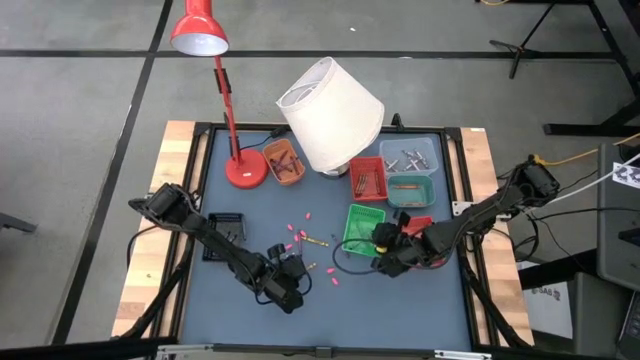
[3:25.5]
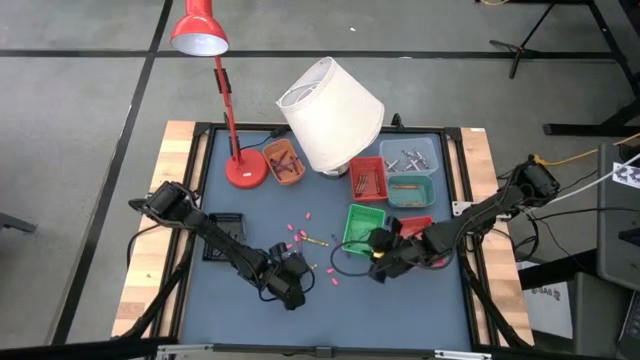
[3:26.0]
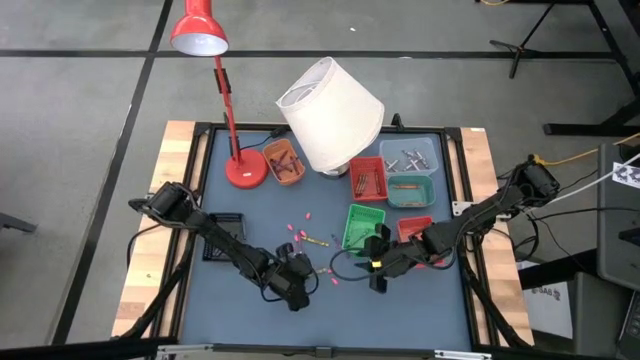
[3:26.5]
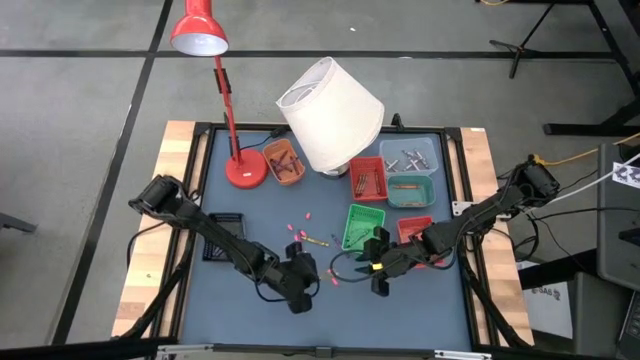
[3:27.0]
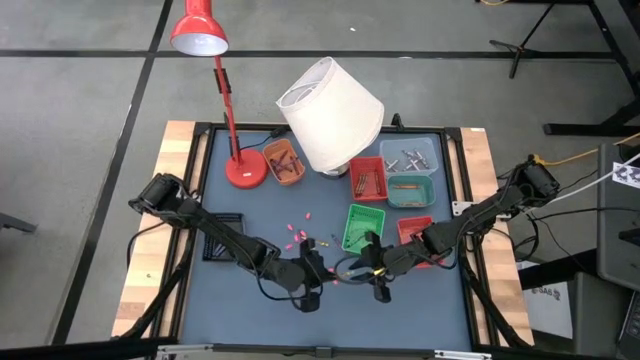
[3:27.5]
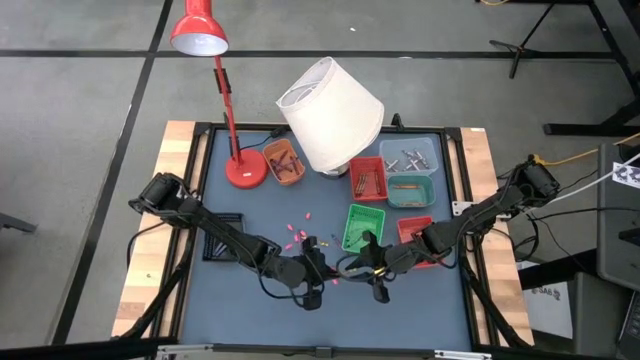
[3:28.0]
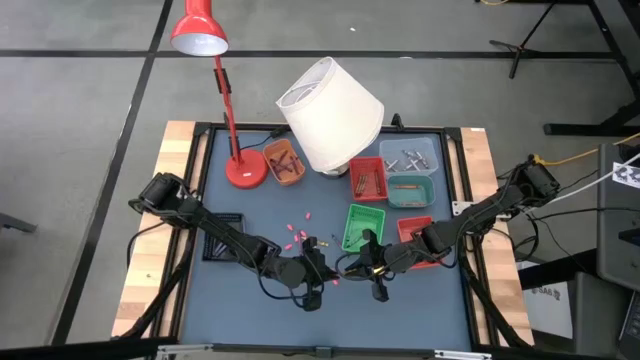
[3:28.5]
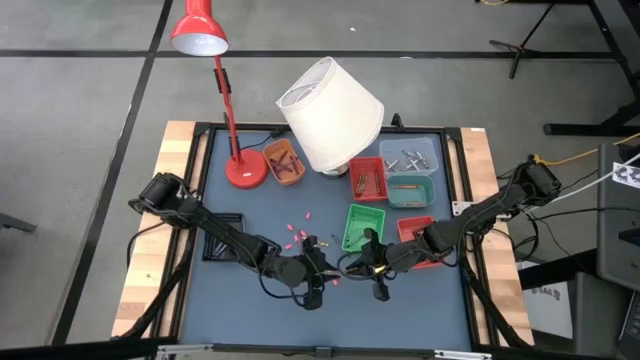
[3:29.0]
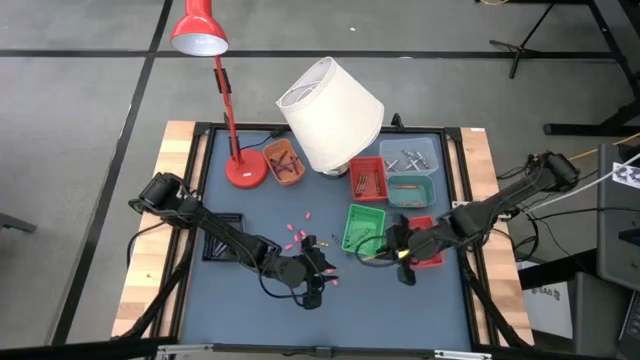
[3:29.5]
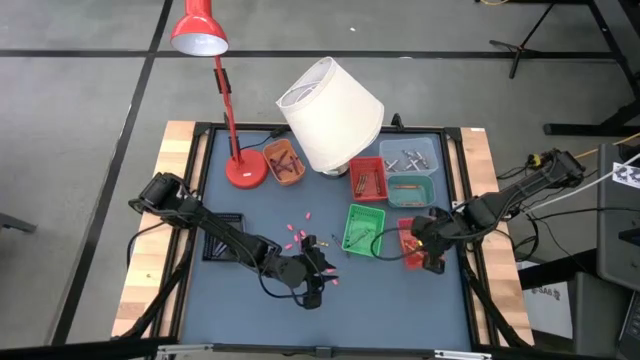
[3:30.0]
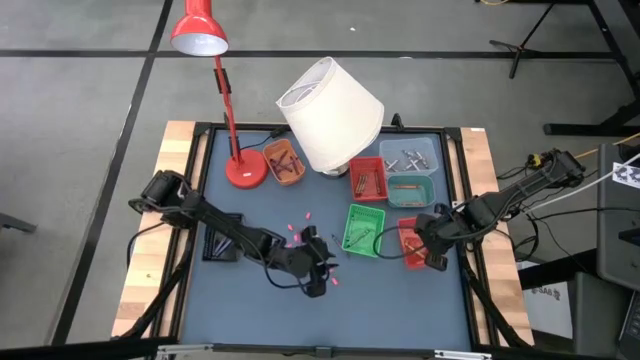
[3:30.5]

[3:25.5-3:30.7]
Task: Sort crayons
Put the yellow crayon into the bottom dark orange bin

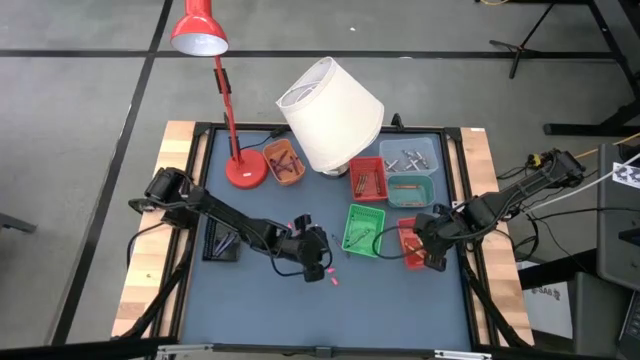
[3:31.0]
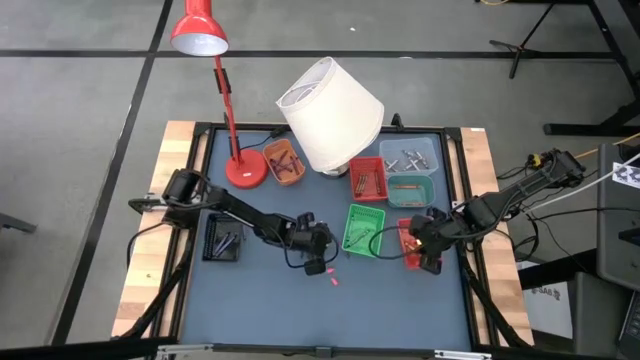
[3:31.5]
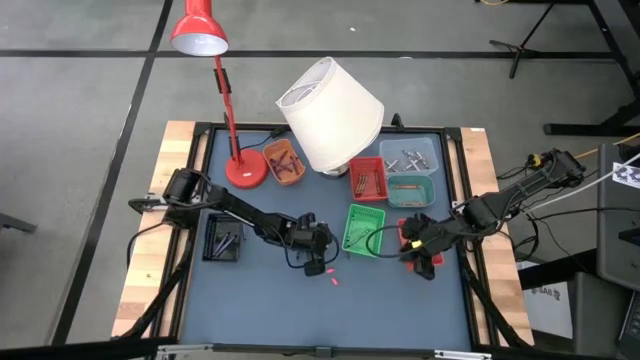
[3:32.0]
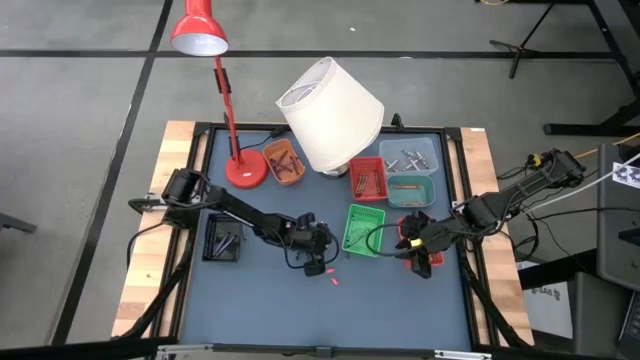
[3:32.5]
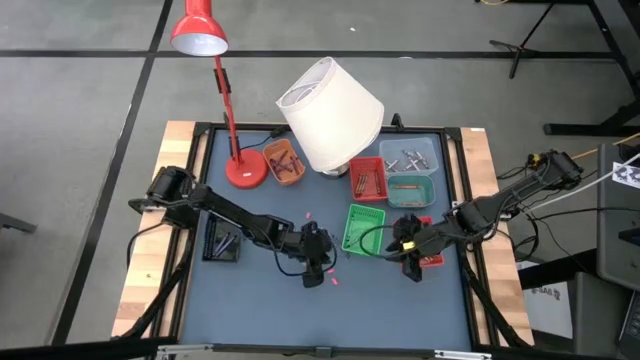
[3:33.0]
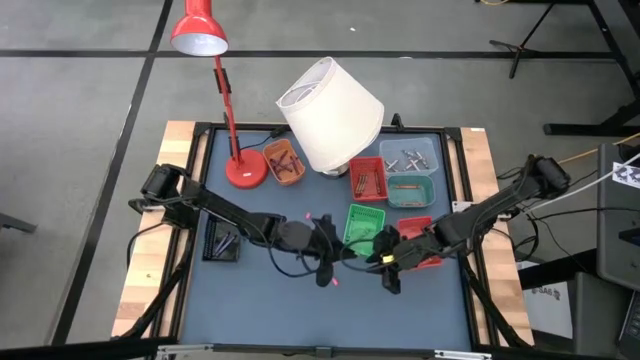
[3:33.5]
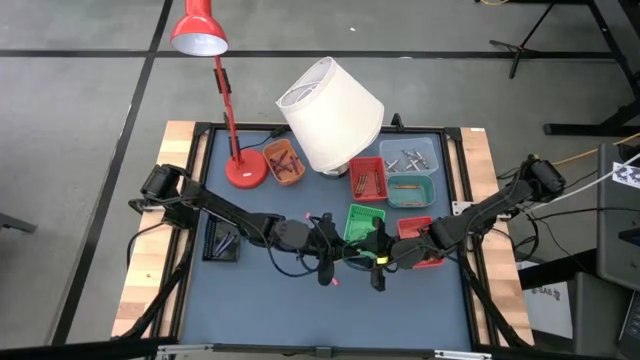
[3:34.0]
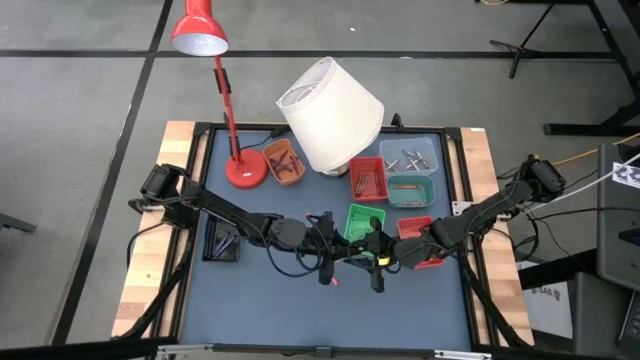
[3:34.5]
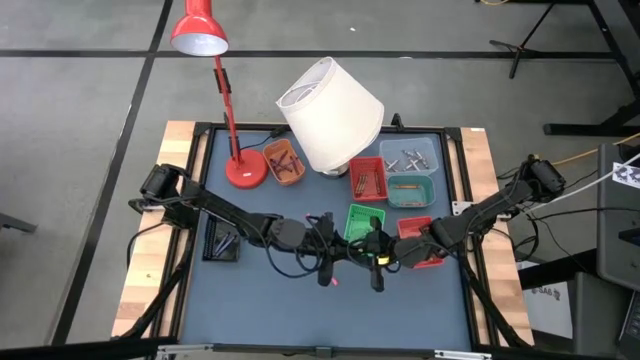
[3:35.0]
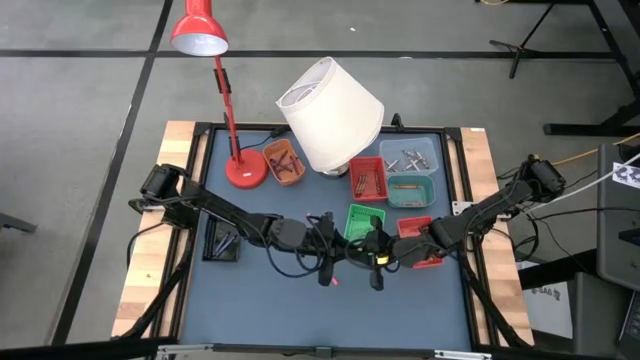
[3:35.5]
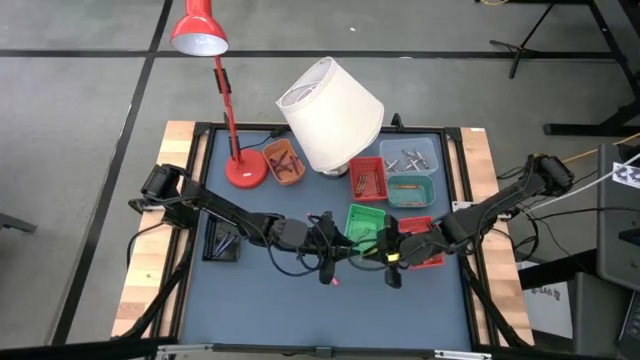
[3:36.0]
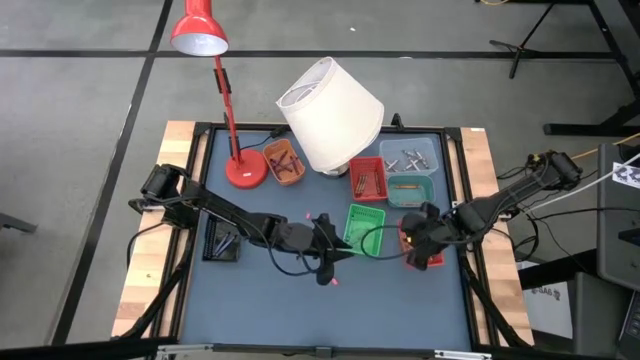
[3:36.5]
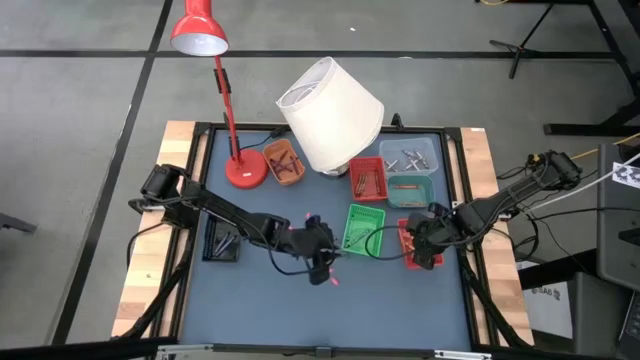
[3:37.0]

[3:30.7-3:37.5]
Put the yellow crayon into the bottom dark orange bin

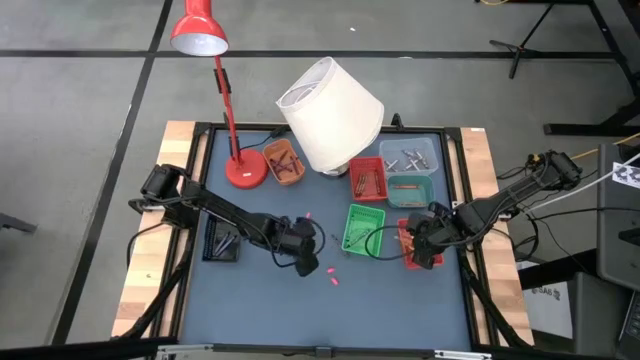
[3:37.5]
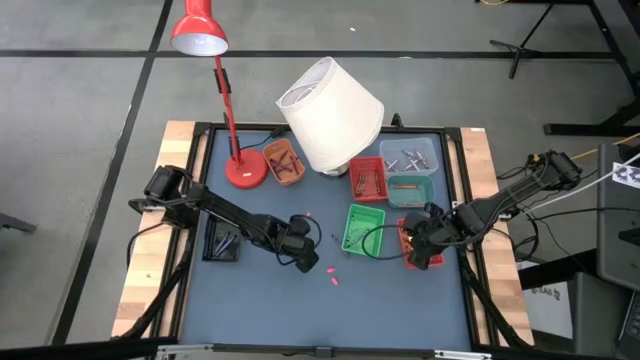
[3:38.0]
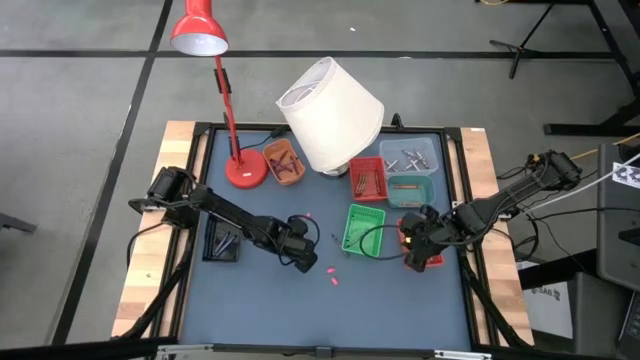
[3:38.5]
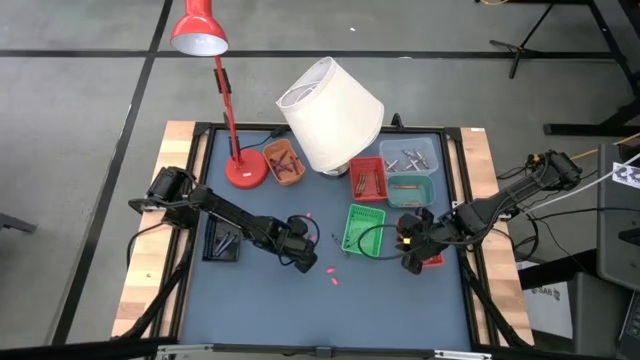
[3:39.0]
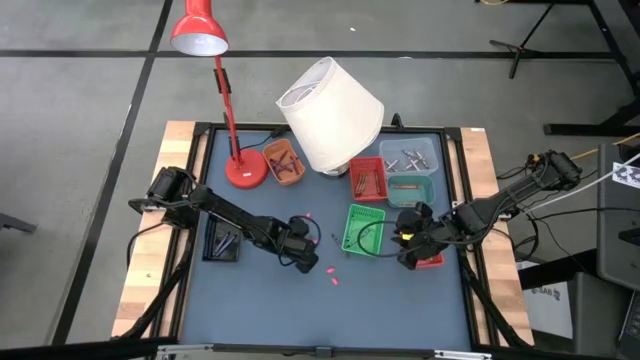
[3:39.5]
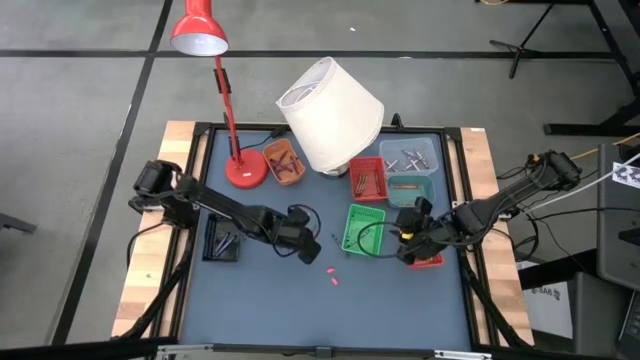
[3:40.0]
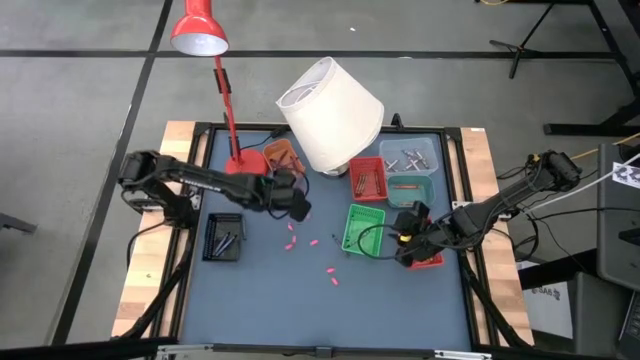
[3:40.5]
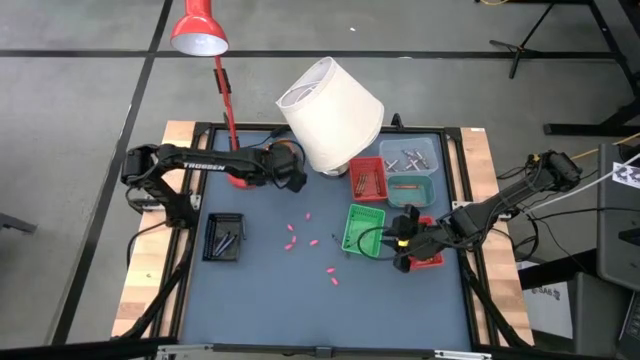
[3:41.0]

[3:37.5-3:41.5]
Put the violet crayon into the orange bin

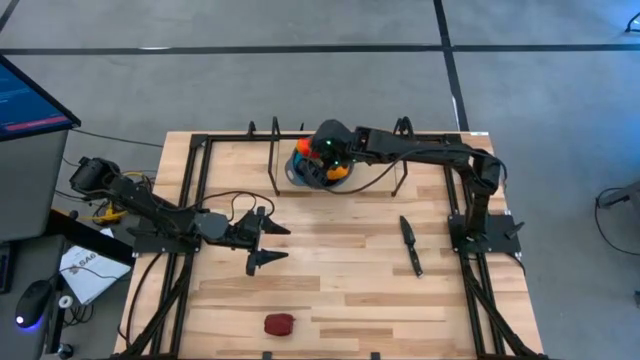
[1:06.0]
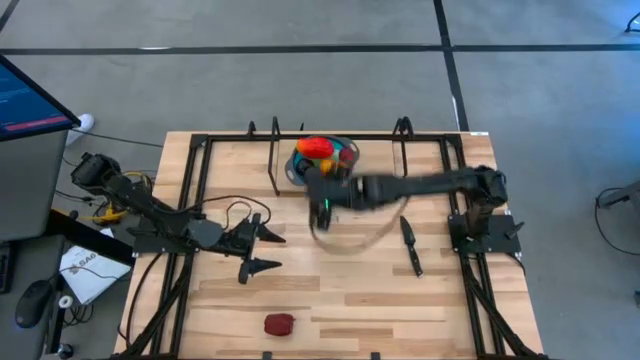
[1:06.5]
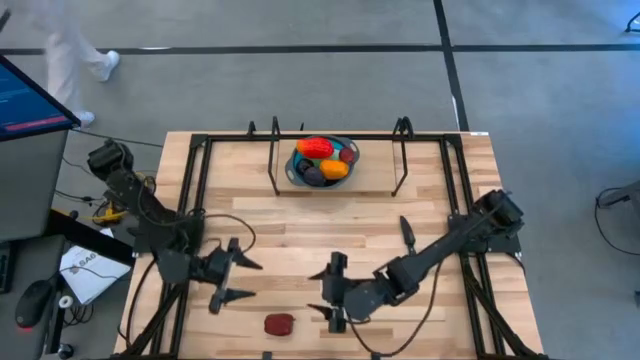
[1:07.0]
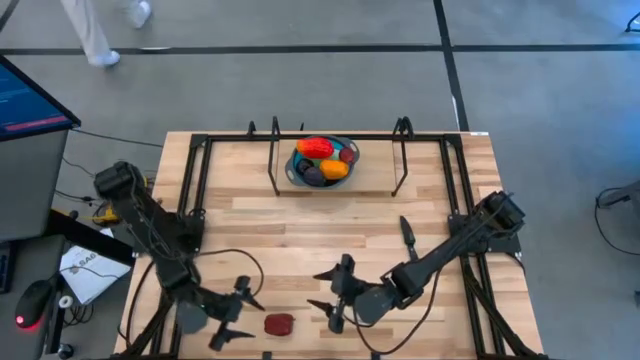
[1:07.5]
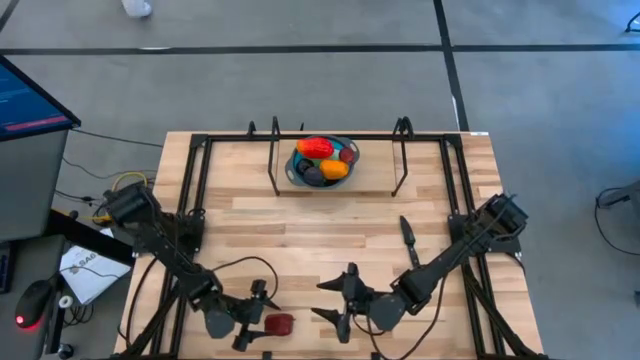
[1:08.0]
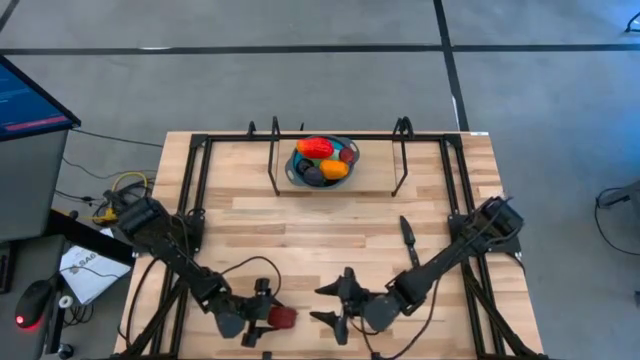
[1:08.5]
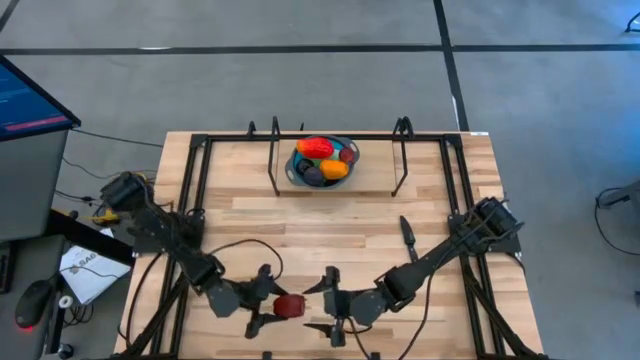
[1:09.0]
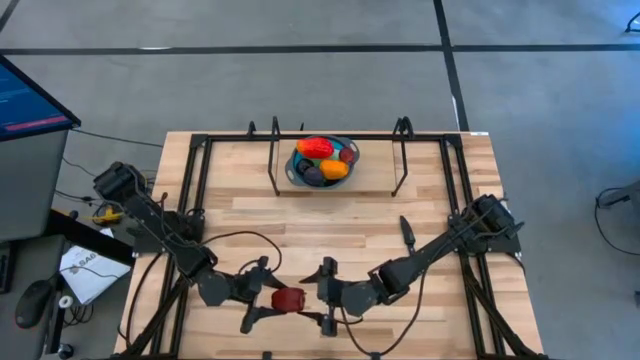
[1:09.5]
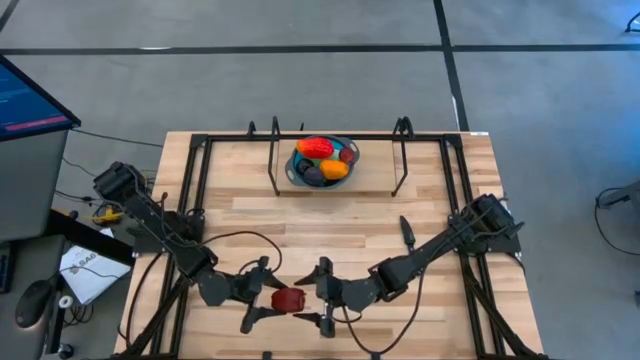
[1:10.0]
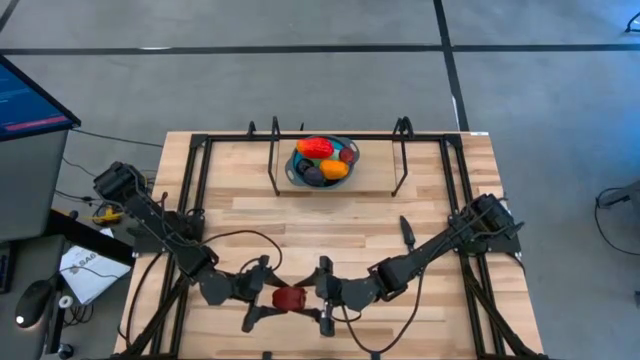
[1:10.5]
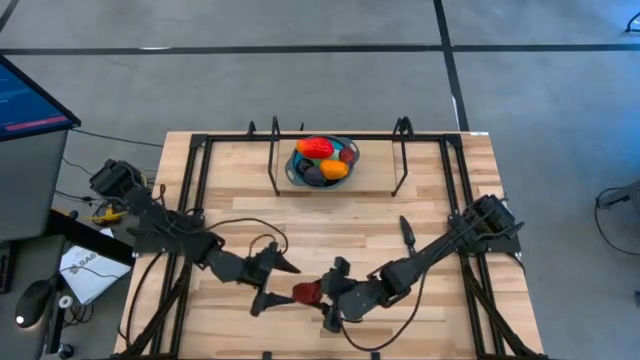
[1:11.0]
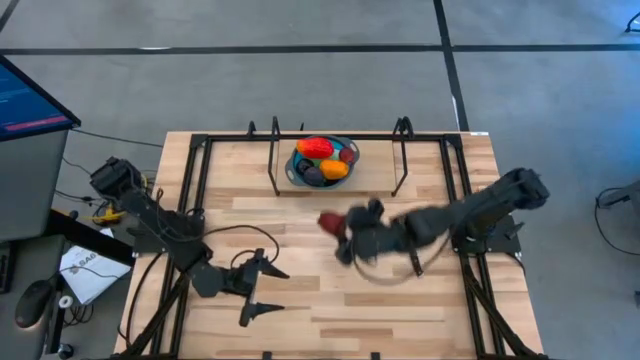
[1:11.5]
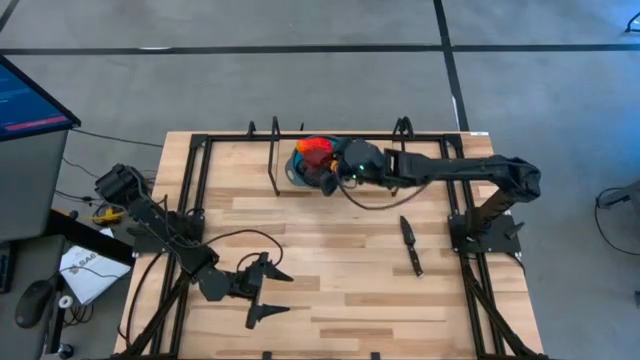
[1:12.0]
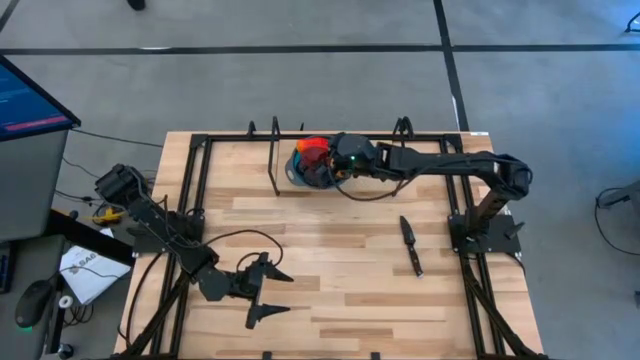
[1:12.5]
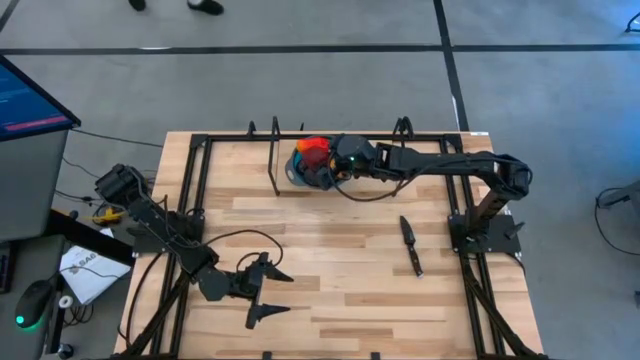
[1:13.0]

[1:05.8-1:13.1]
Task: Pick & Place Fruit
Put the red apple into the blue strainer bowl on the shelf
